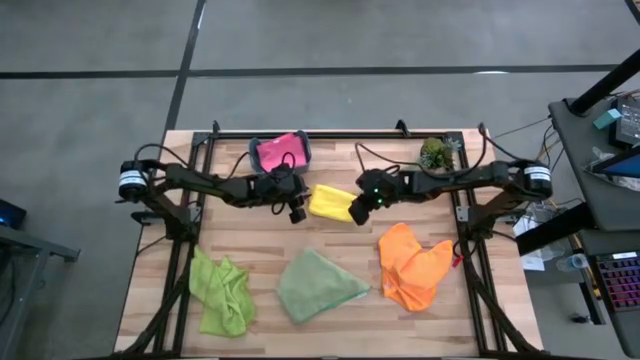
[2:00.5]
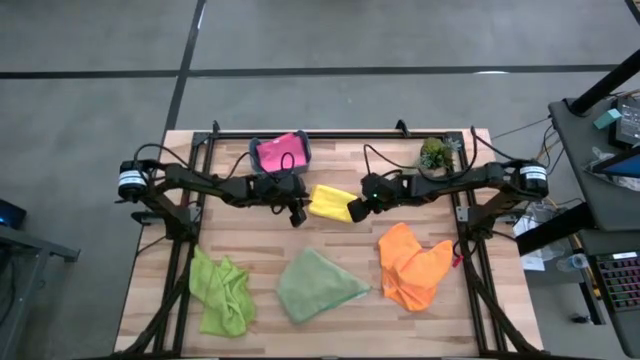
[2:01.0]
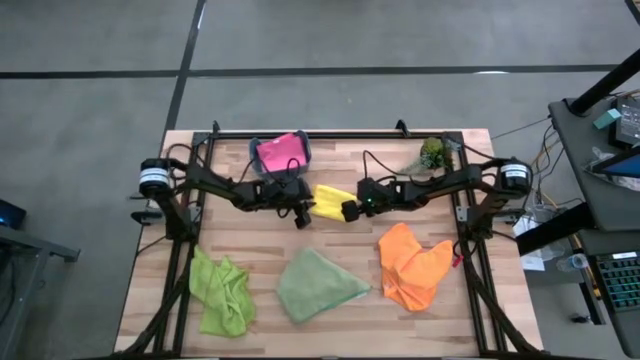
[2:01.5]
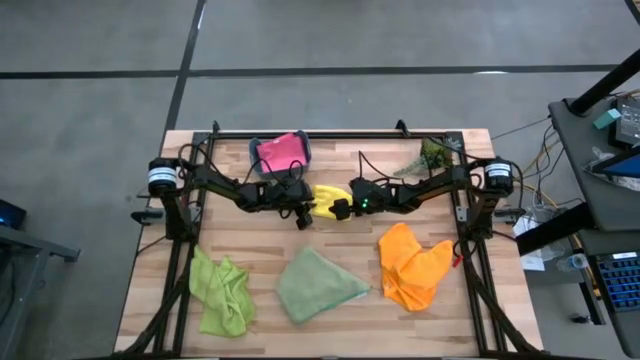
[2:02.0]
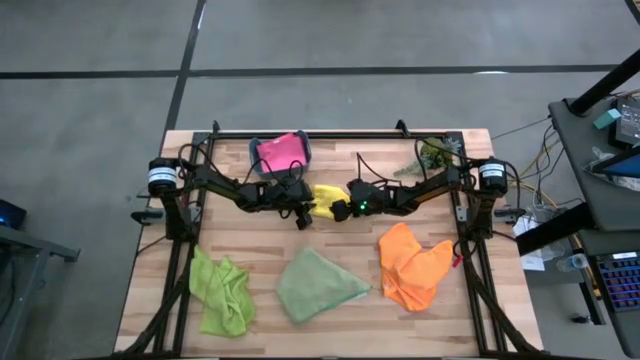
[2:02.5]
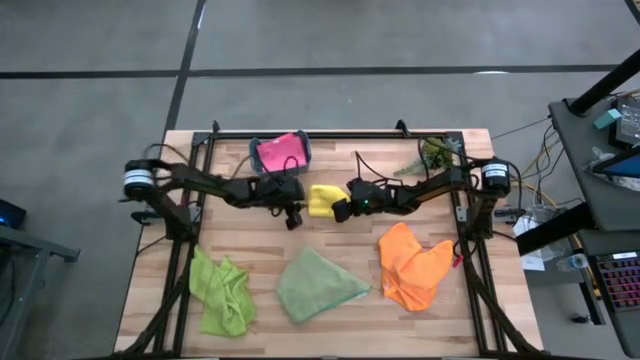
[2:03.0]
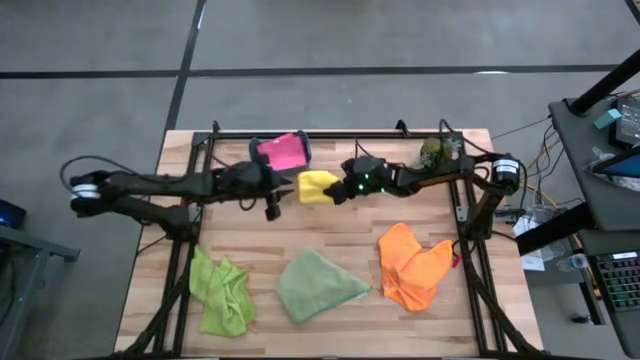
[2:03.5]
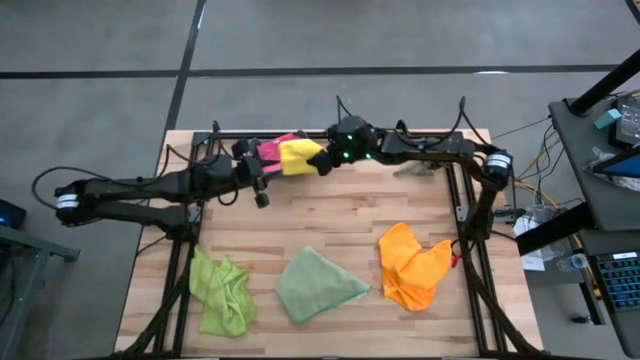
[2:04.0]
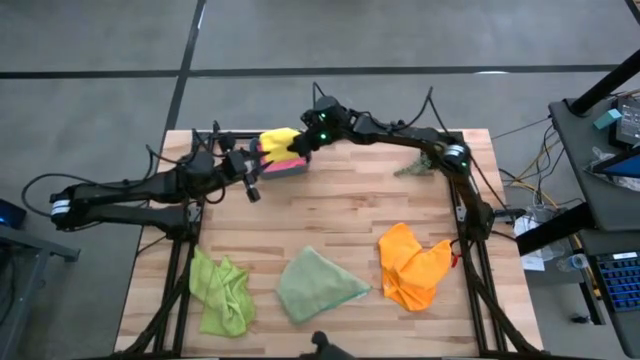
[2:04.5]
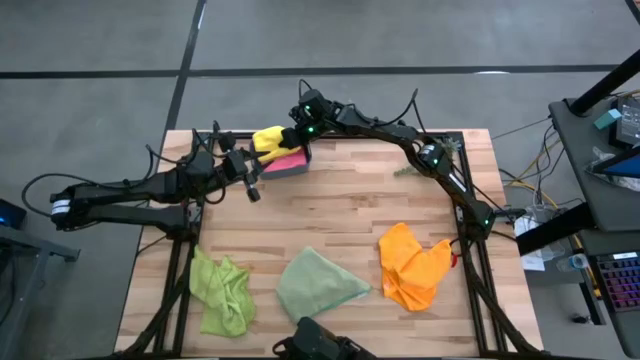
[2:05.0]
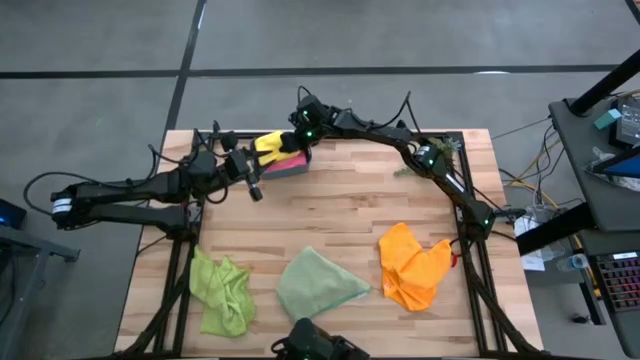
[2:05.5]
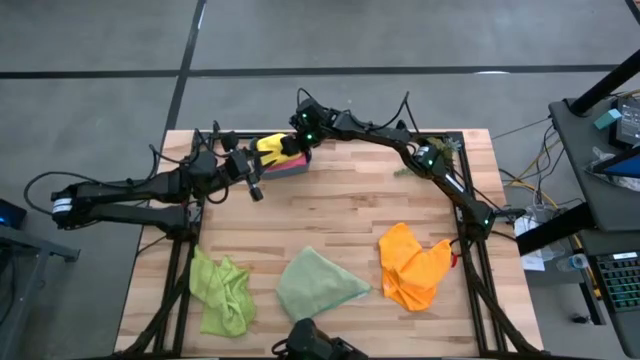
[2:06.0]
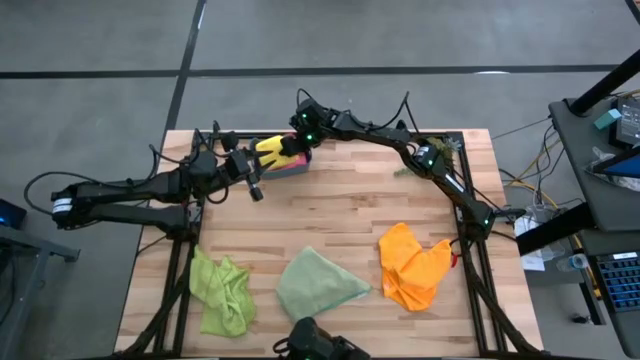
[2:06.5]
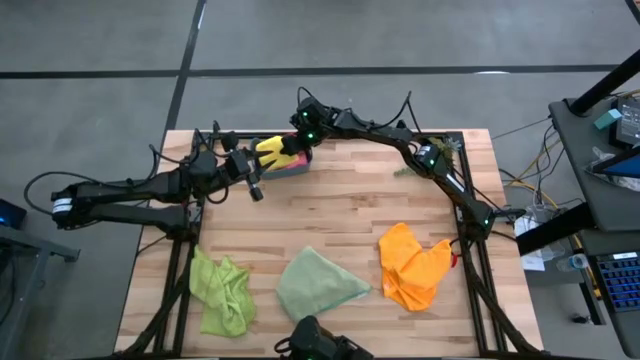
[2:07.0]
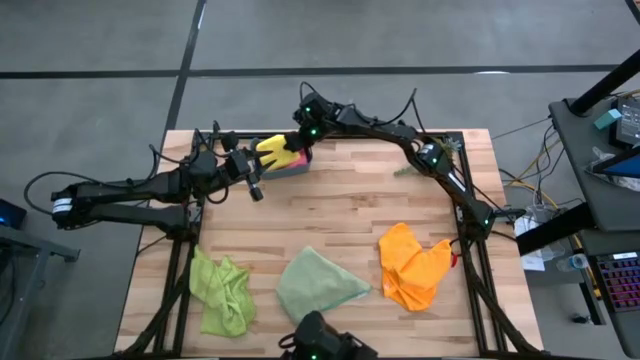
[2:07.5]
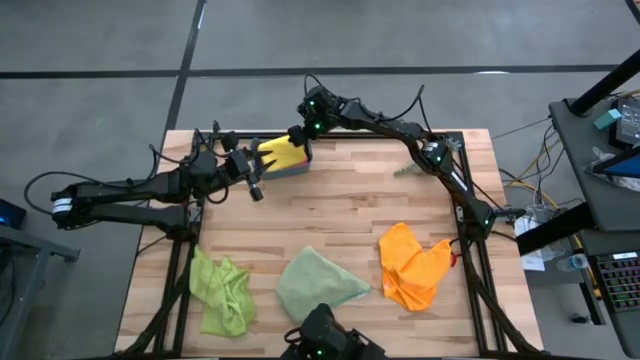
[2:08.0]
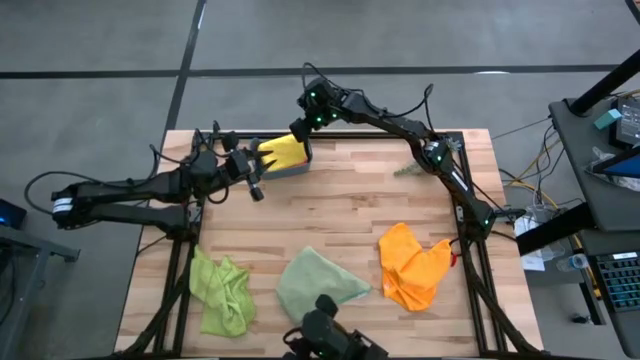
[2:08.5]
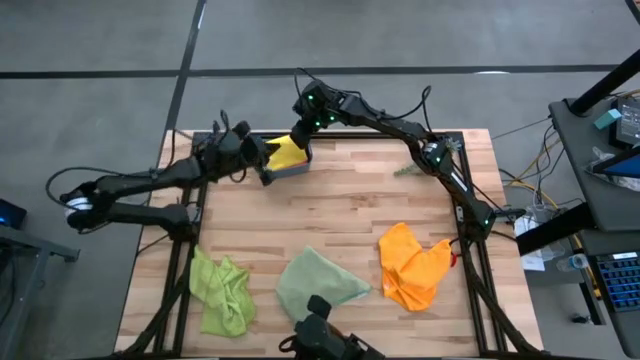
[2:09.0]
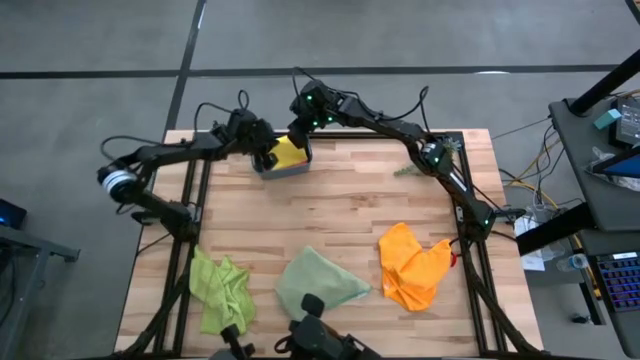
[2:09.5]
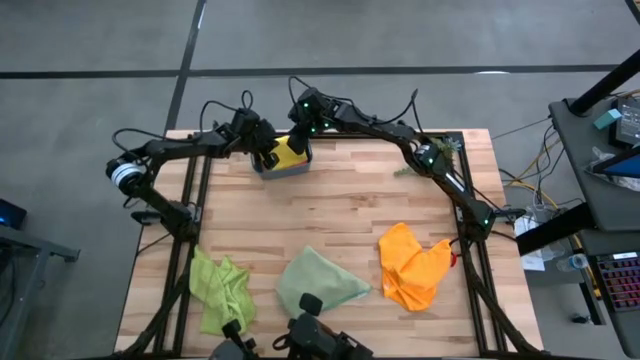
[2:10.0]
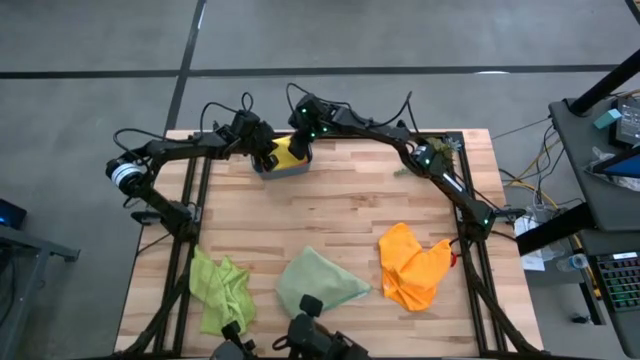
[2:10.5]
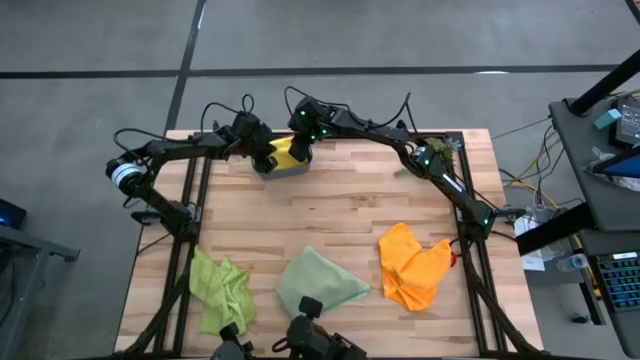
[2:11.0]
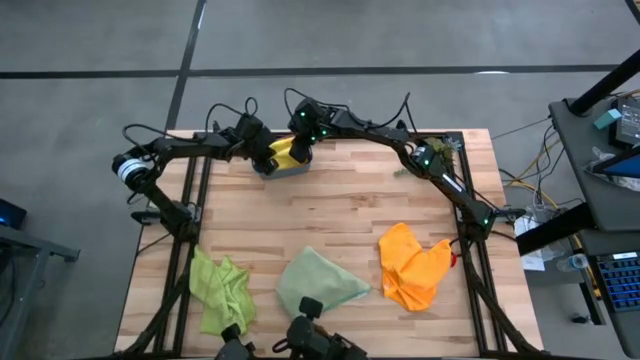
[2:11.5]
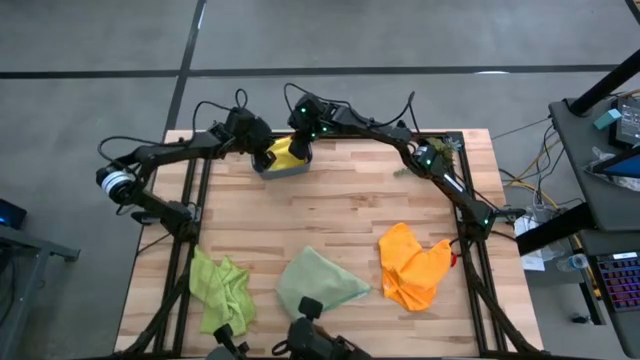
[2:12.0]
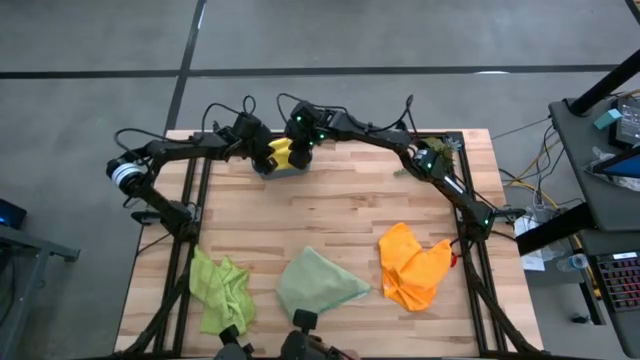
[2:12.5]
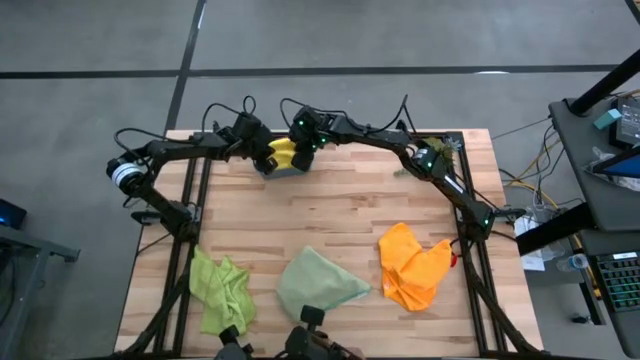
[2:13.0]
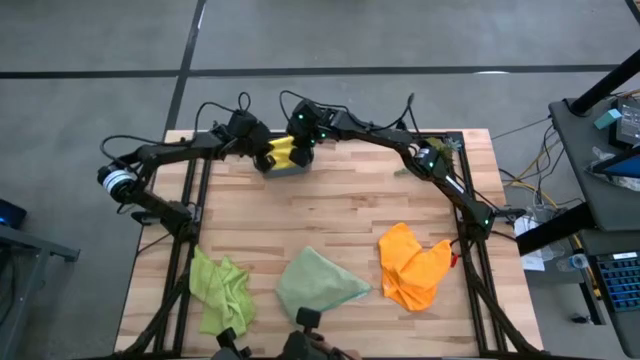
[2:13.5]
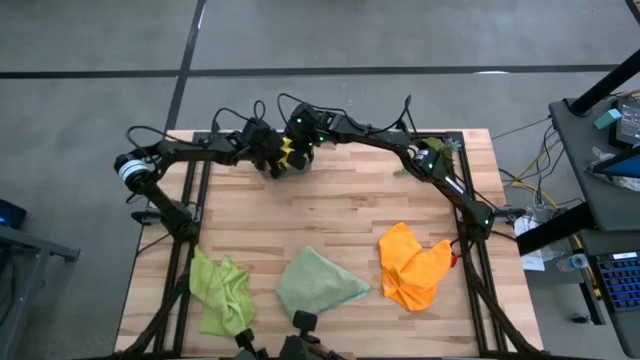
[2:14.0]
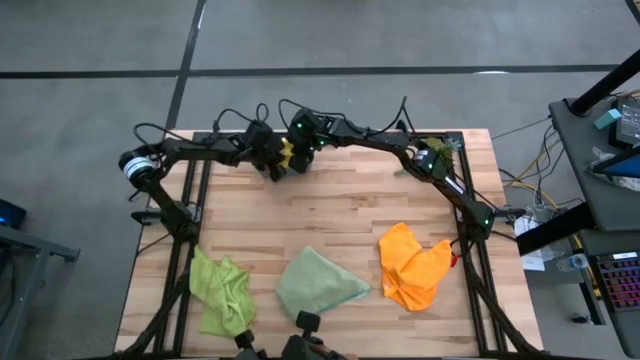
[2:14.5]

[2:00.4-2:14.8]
Task: Fold microfiber towels
Put the yellow microfiber towel into the green bin

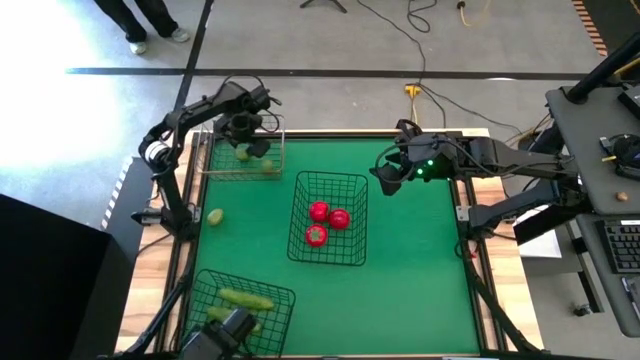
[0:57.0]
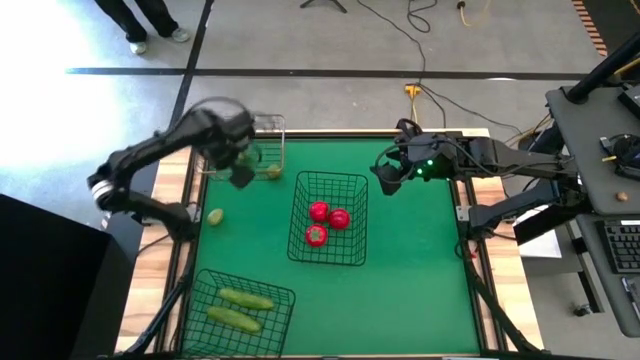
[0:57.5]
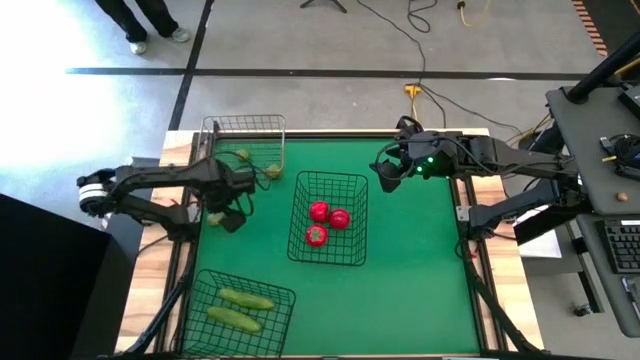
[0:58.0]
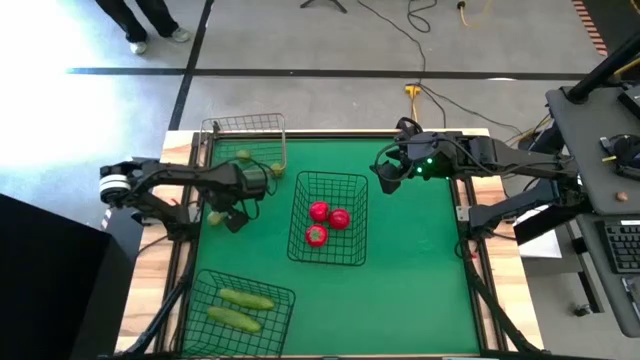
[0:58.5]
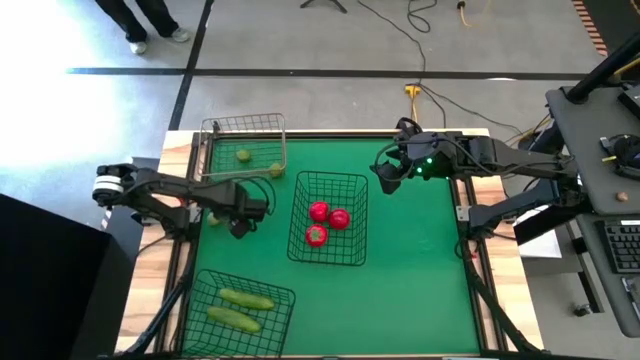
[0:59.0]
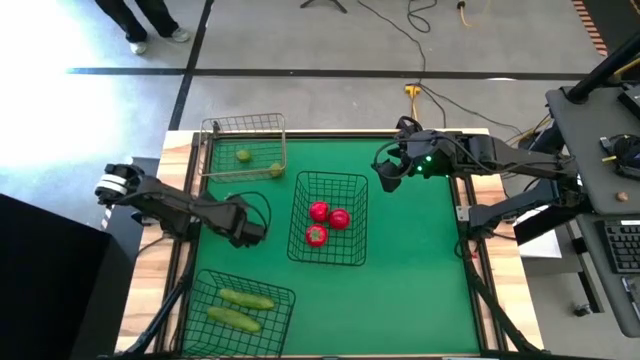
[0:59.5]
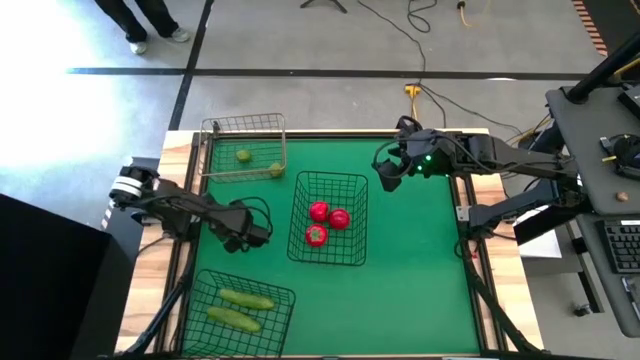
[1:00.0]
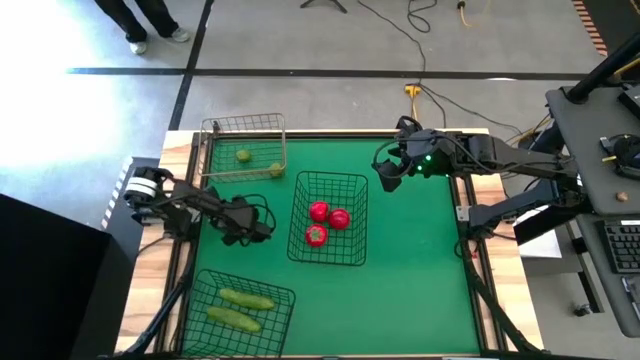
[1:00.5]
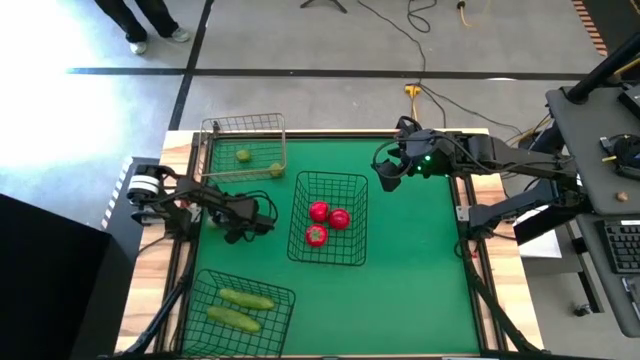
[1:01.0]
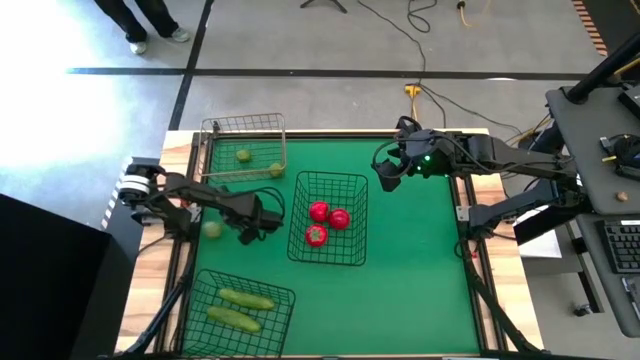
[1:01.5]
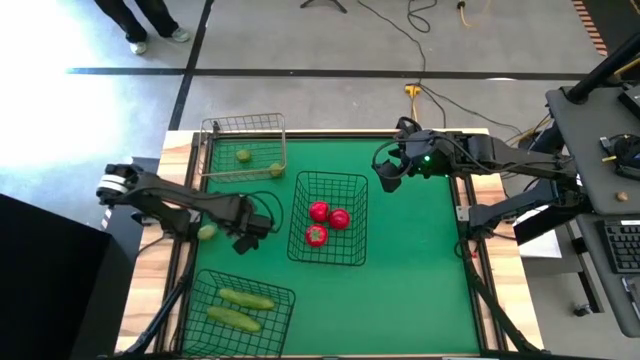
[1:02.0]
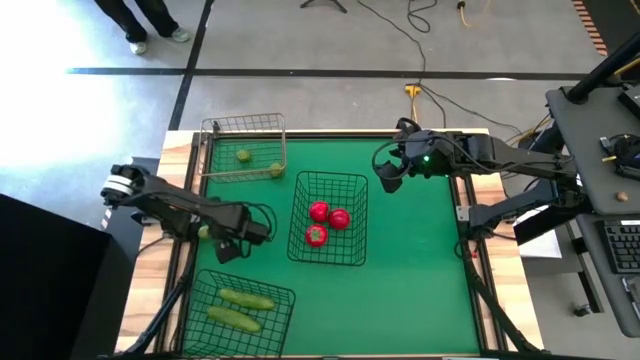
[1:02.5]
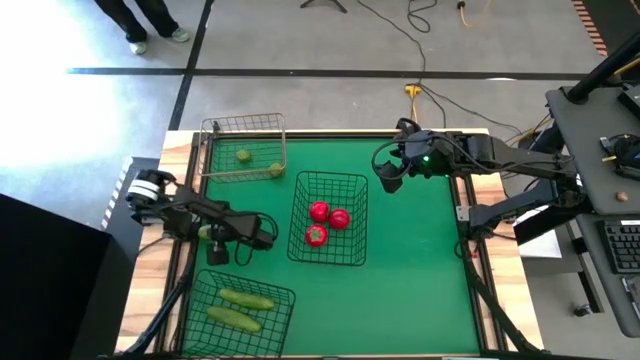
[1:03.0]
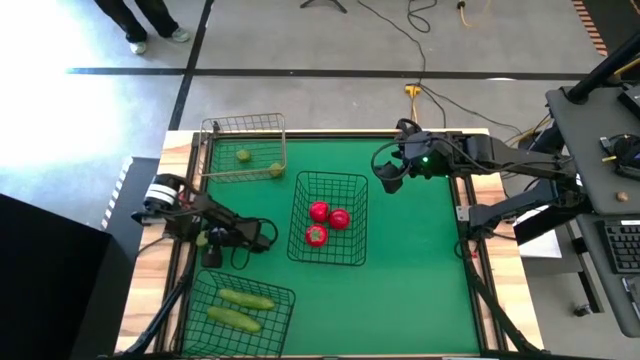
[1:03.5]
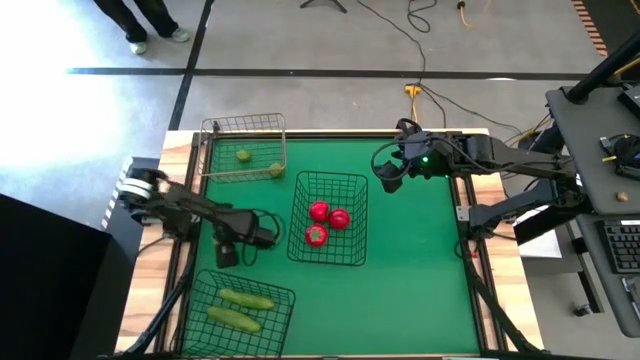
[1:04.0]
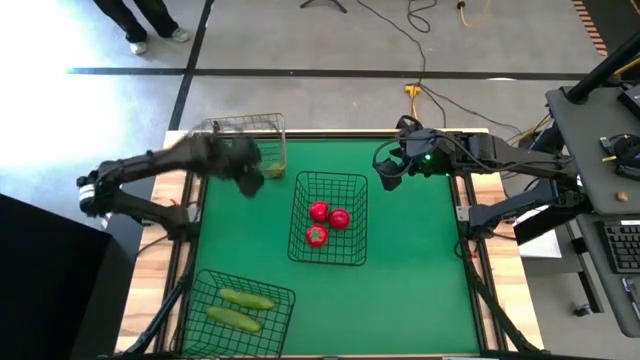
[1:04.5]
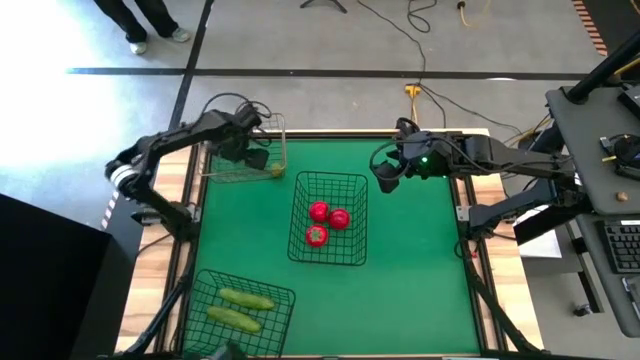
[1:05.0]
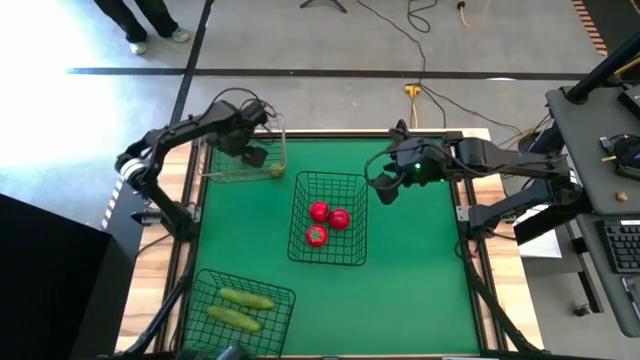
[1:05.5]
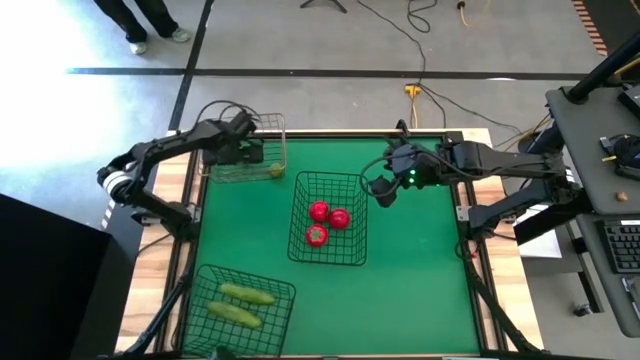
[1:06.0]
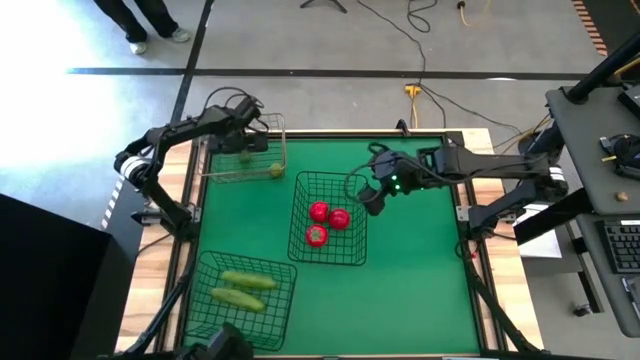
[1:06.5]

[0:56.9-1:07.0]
Task: Sort produce into baskets
Put the lime into the gold wire basket
